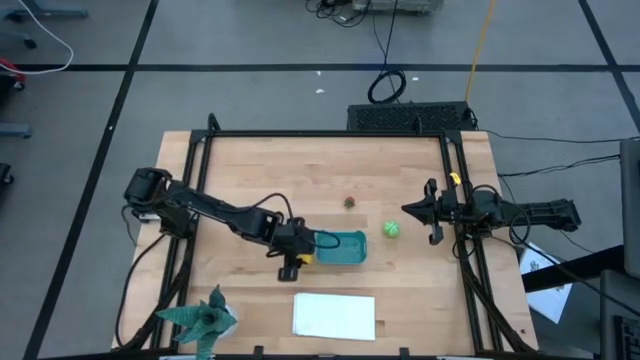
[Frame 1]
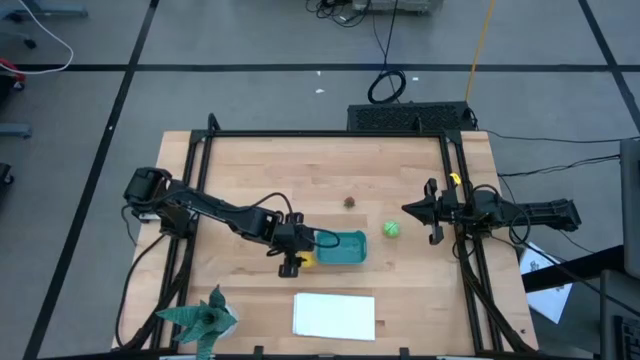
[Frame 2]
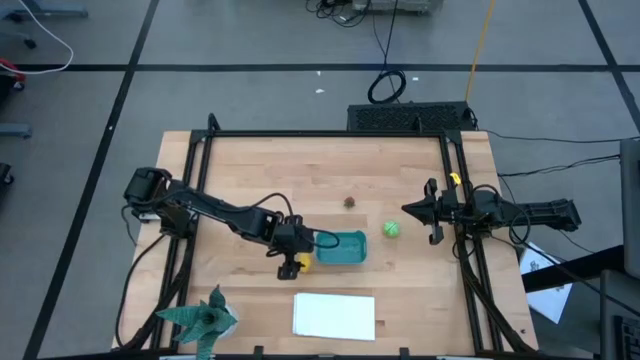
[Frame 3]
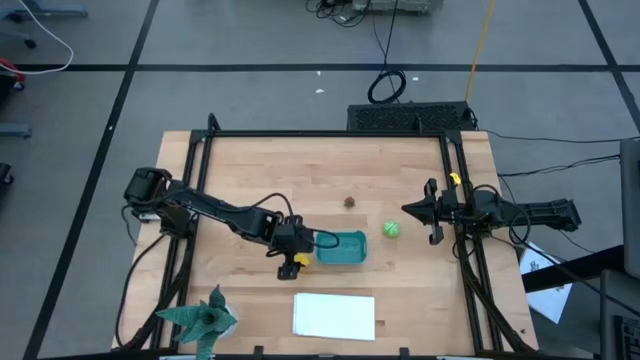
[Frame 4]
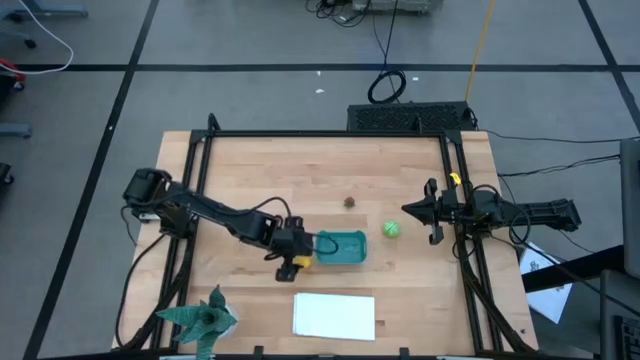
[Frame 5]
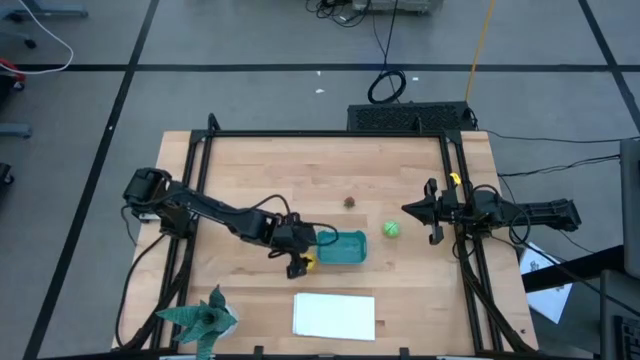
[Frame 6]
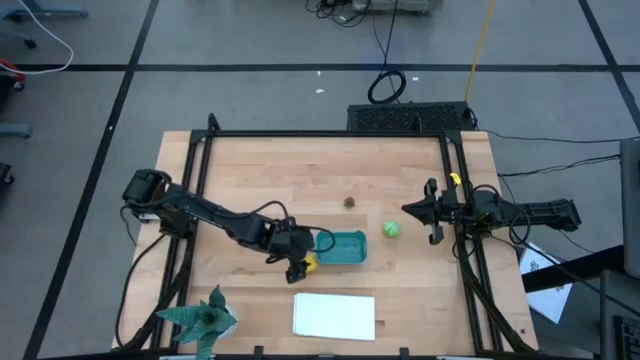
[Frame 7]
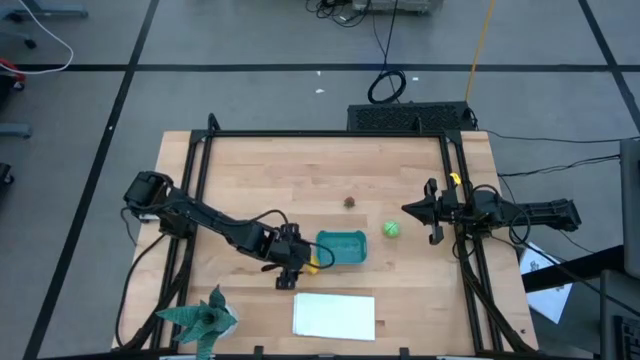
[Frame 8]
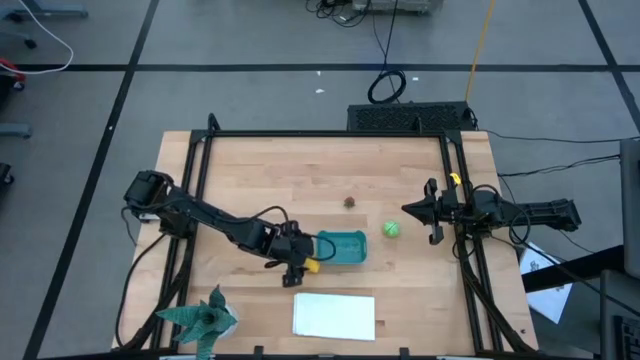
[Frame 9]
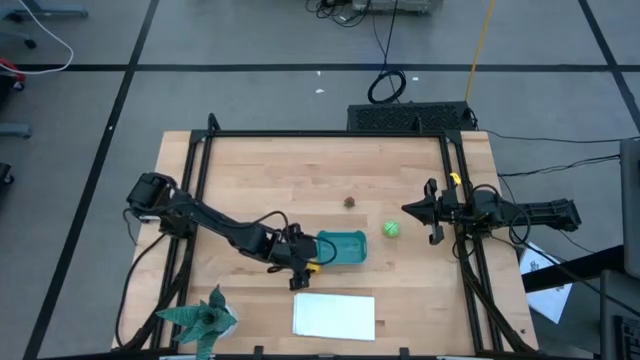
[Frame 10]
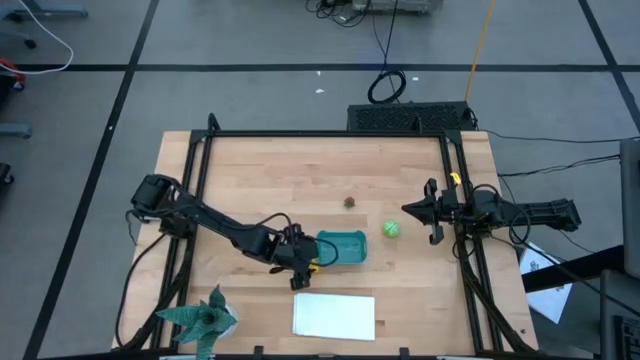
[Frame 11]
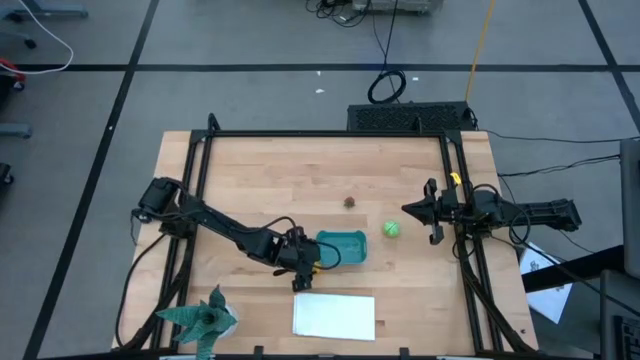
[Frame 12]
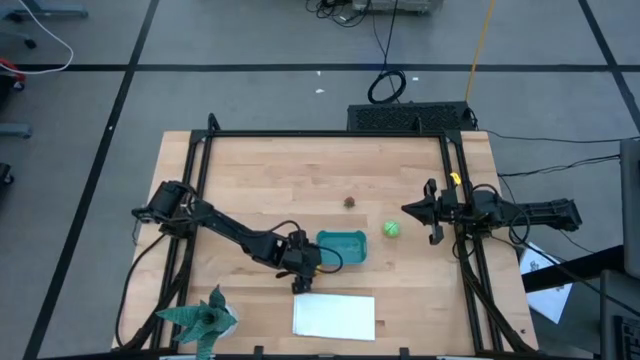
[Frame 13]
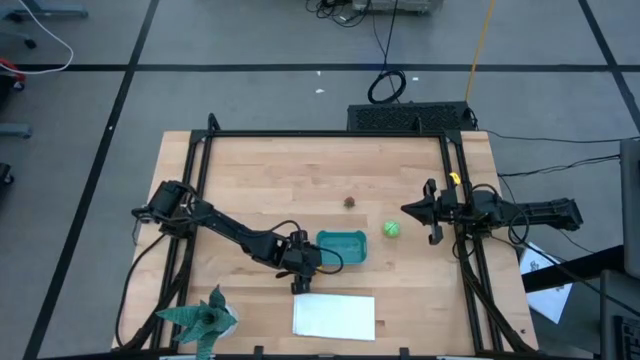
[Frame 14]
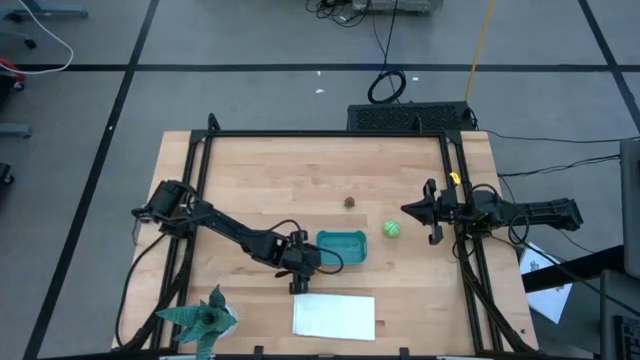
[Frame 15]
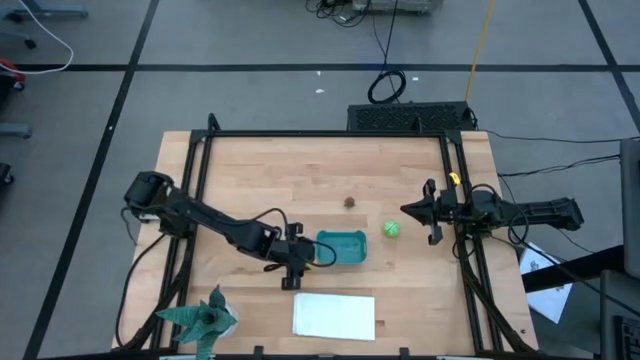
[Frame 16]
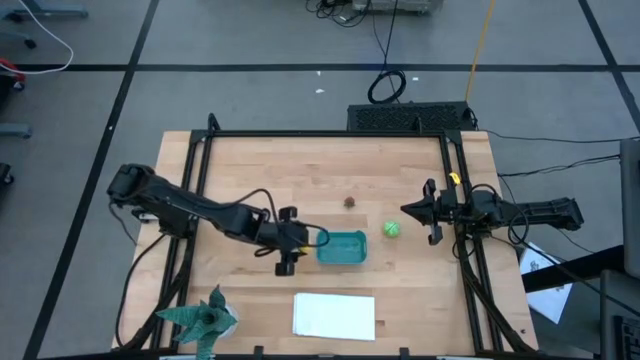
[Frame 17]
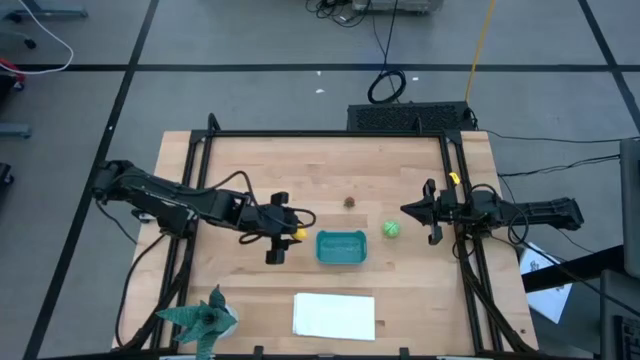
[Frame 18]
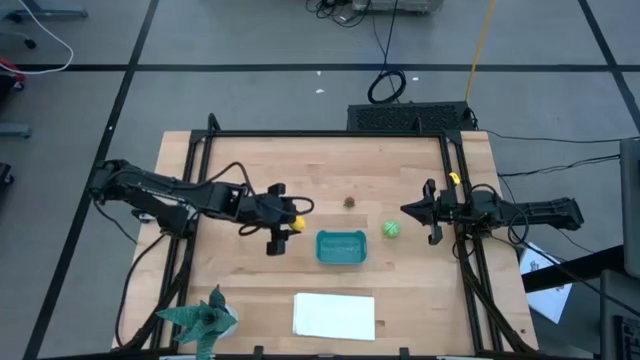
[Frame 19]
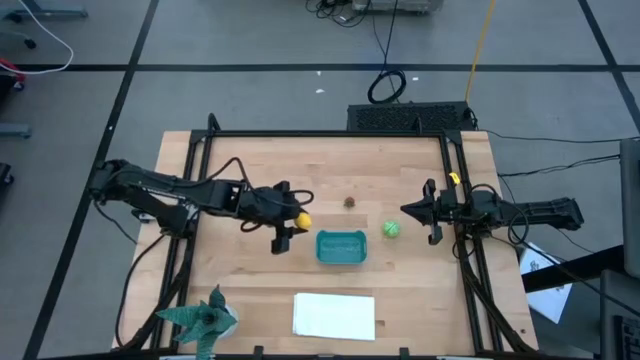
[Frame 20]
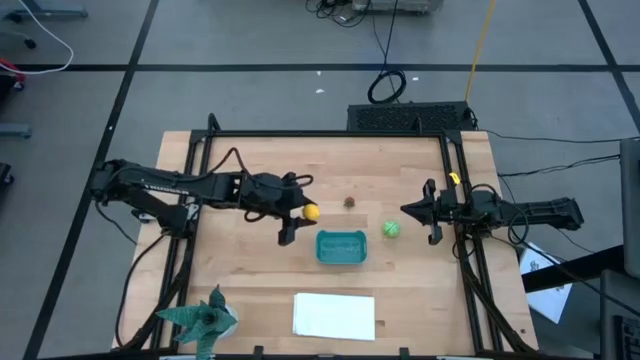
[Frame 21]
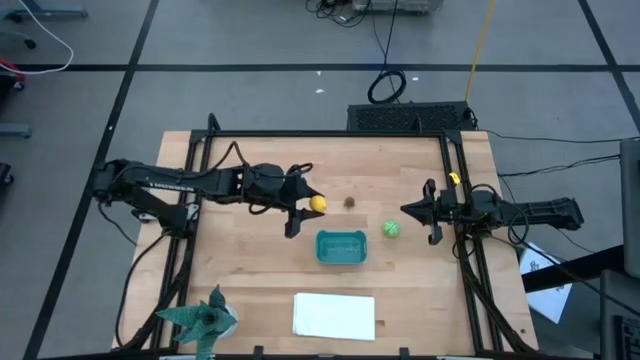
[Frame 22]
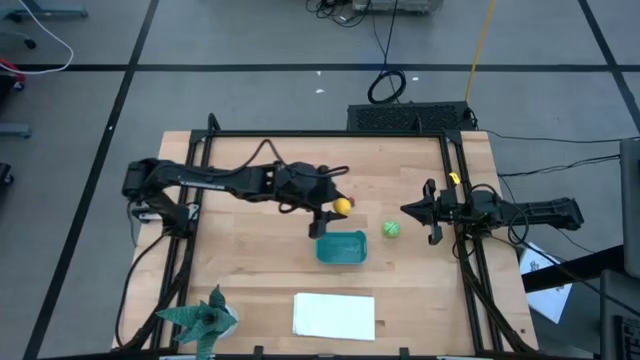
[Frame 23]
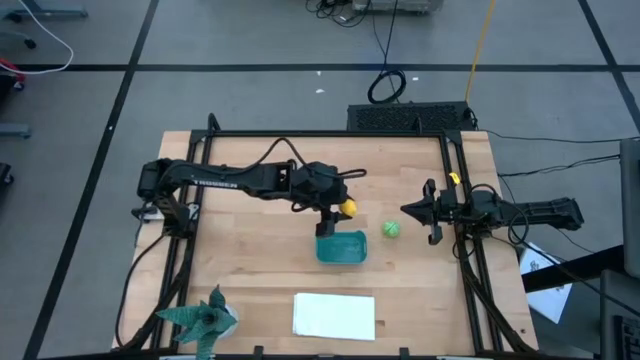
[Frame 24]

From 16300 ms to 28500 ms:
Task: Pick and placing Produce into tupperware
Put the yellow lemon into the green bin

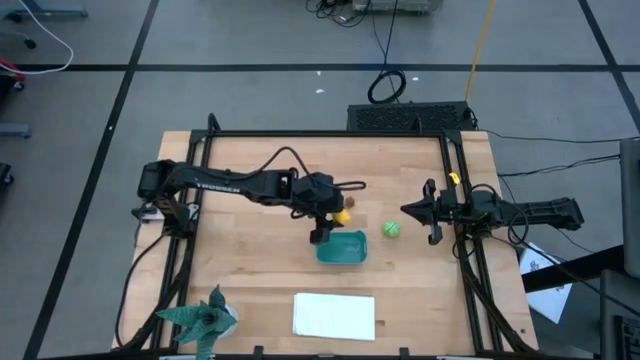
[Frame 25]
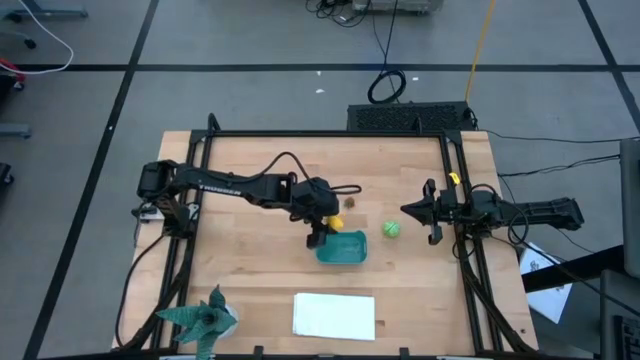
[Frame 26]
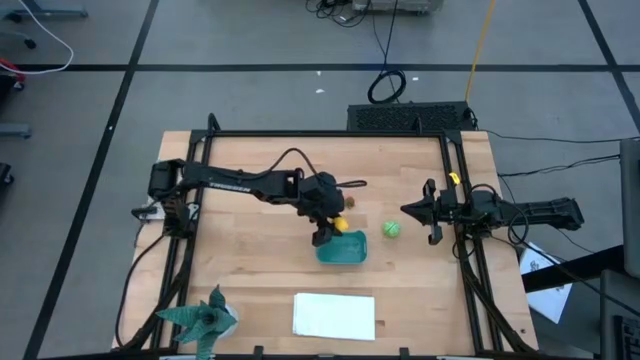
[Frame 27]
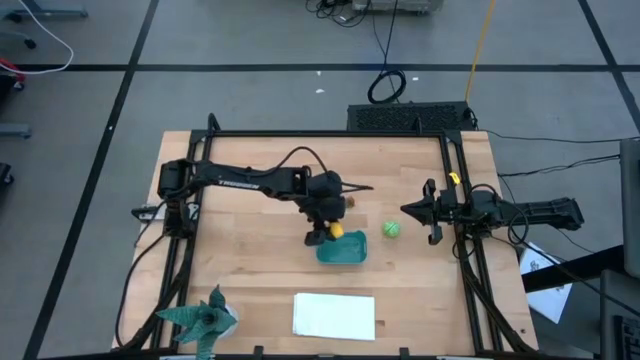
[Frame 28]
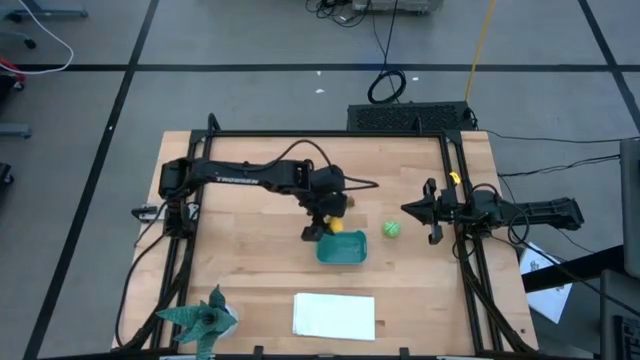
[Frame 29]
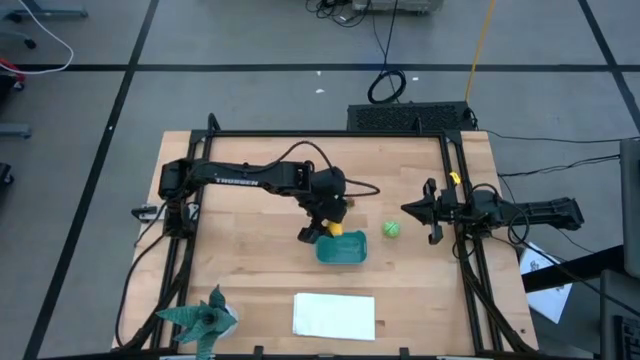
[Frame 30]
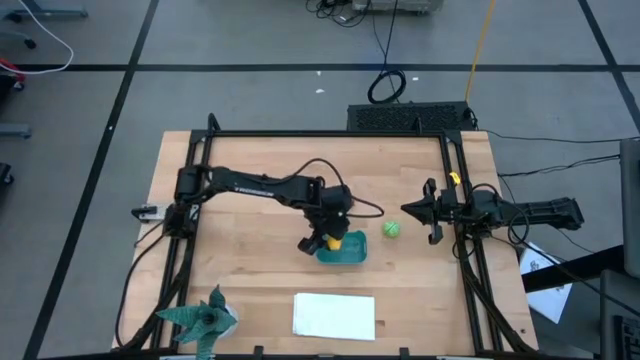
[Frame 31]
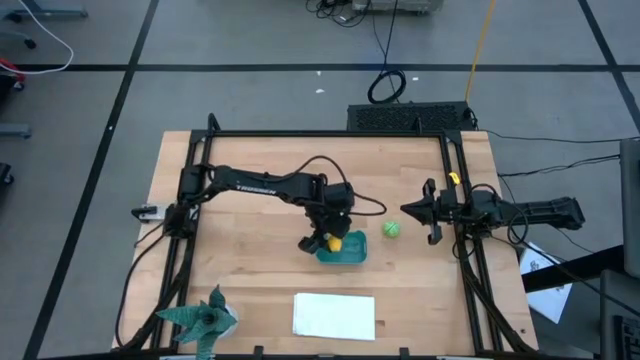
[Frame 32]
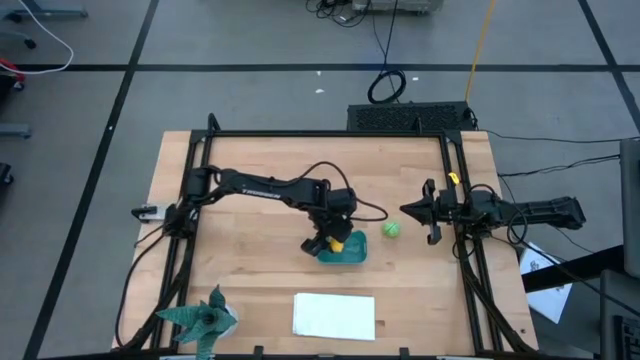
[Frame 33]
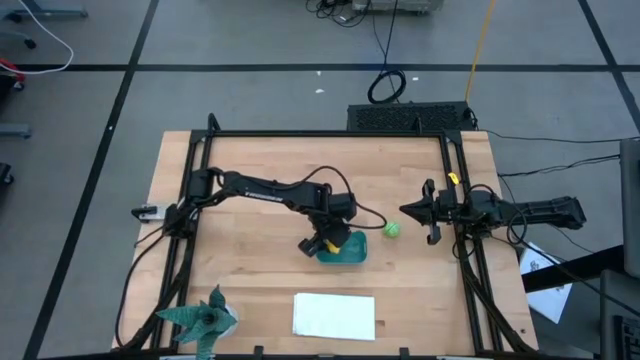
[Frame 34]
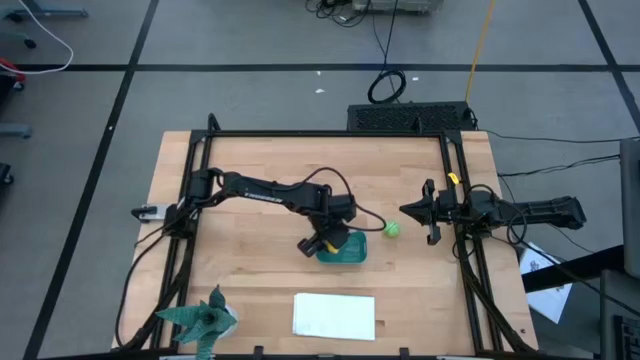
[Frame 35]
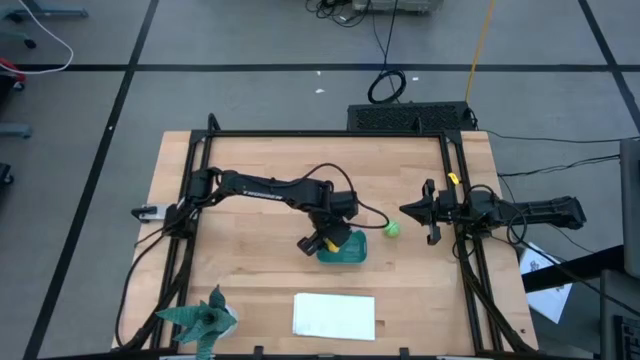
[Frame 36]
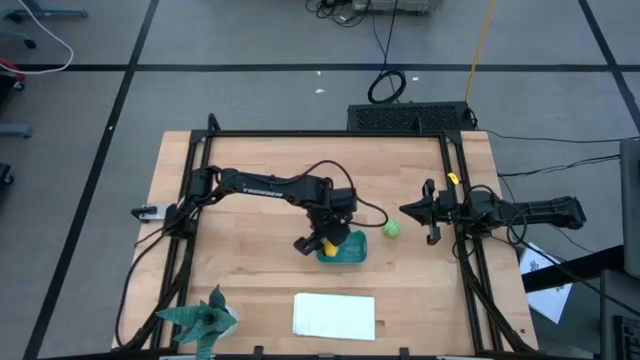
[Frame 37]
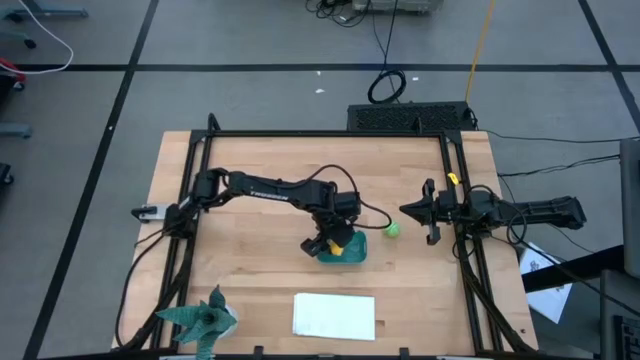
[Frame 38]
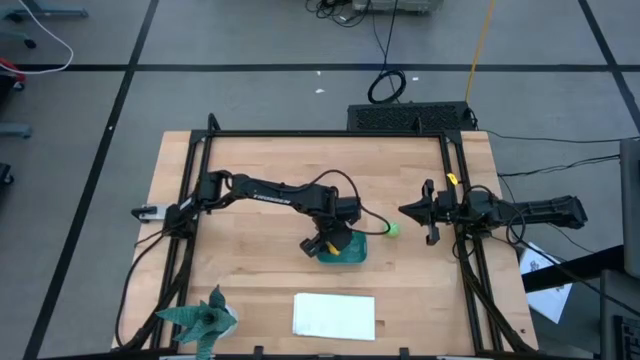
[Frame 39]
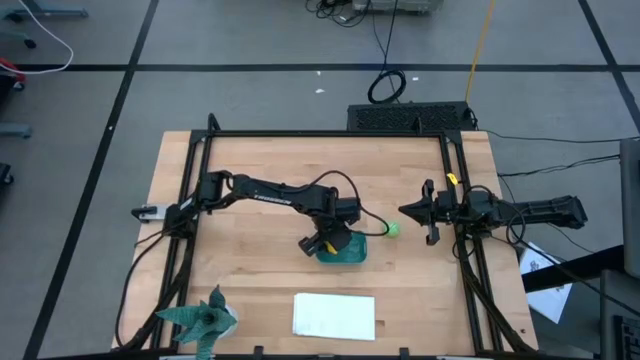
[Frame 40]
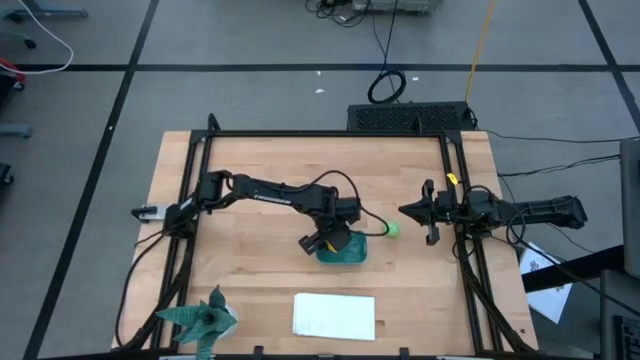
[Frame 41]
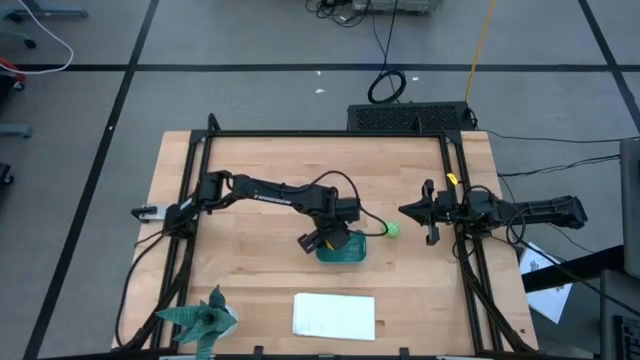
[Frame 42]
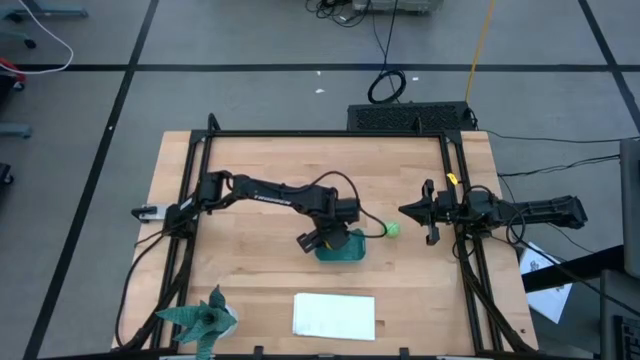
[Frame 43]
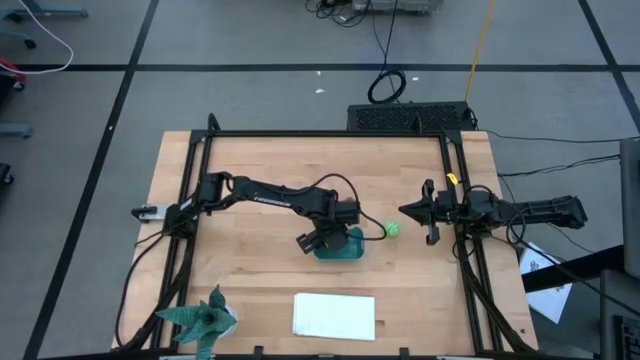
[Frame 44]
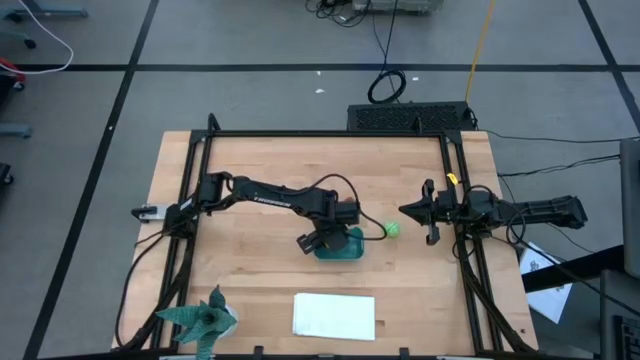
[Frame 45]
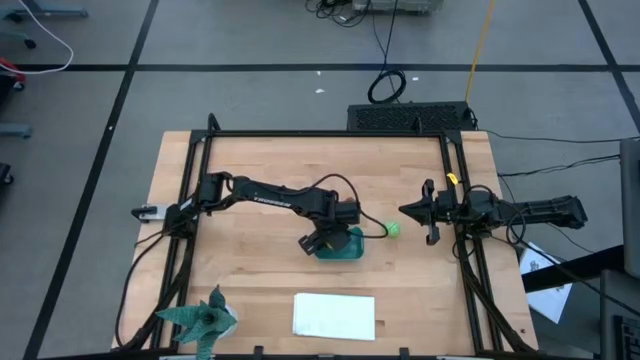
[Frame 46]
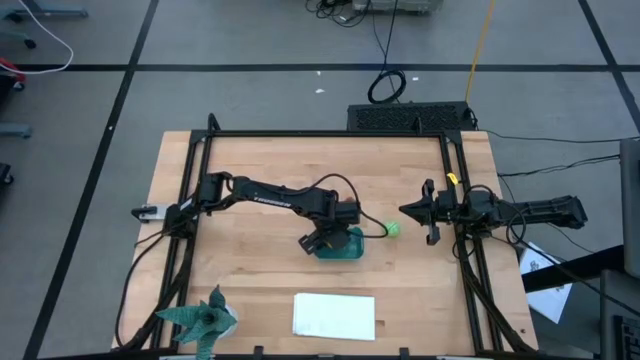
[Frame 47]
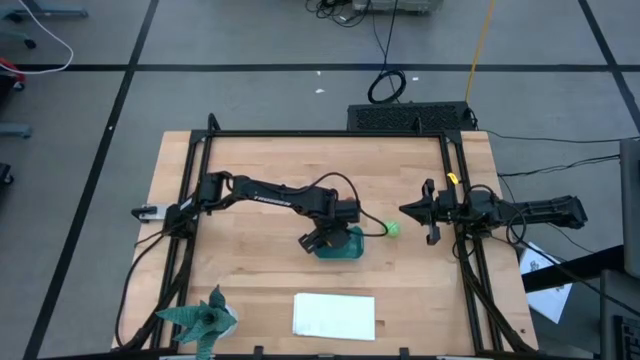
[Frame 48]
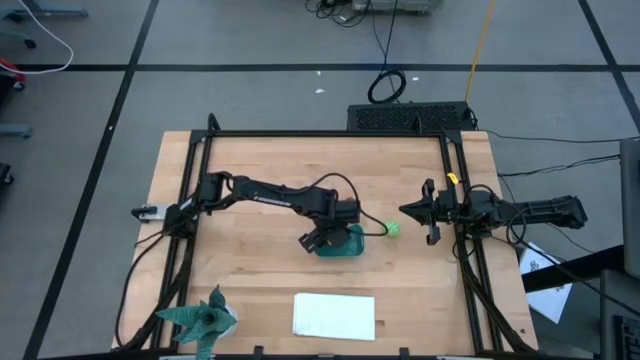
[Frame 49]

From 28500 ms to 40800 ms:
Put the yellow lemon into the green bin
